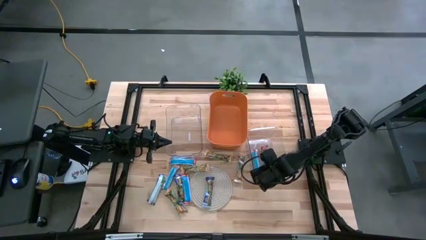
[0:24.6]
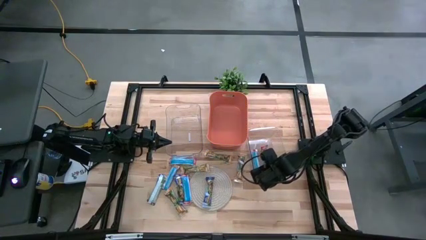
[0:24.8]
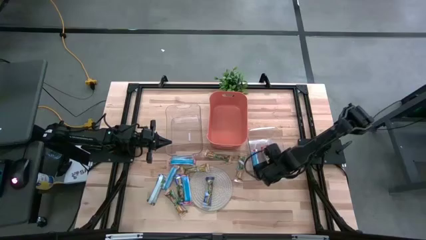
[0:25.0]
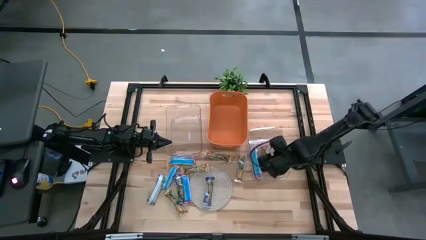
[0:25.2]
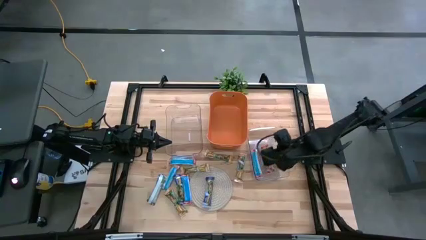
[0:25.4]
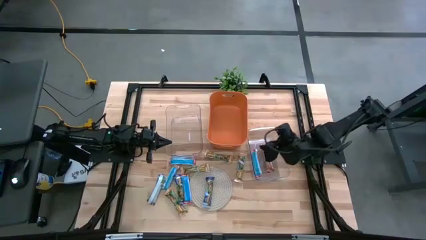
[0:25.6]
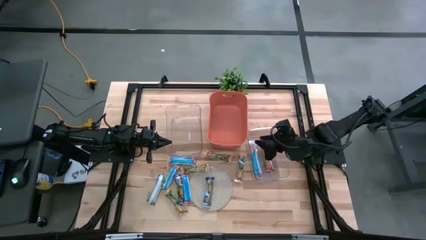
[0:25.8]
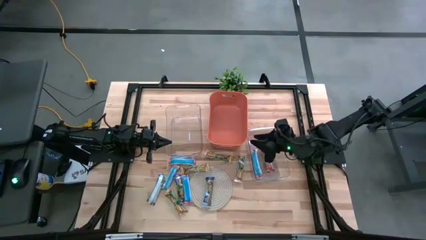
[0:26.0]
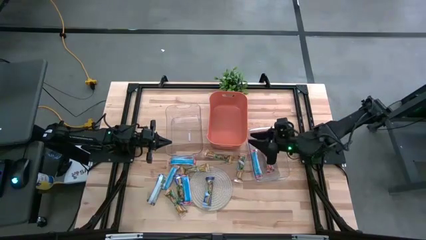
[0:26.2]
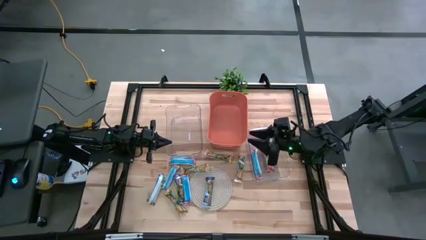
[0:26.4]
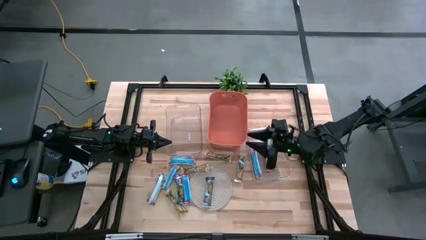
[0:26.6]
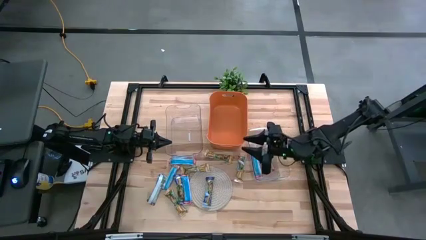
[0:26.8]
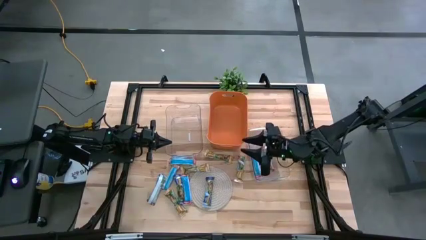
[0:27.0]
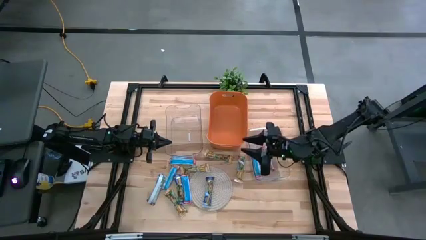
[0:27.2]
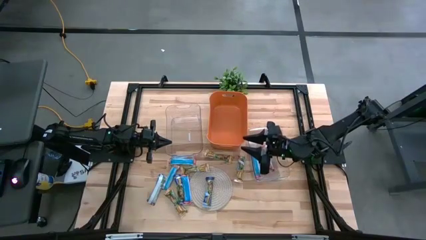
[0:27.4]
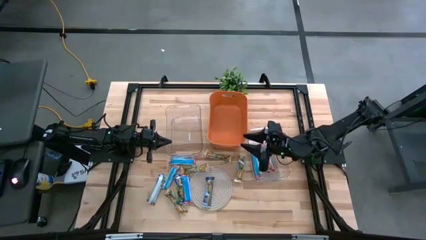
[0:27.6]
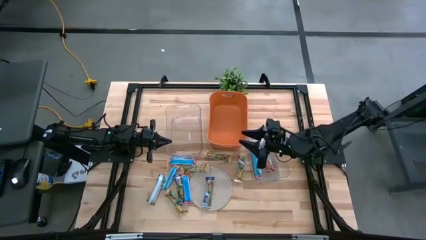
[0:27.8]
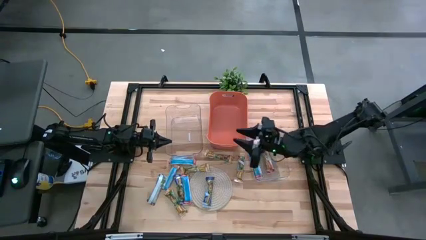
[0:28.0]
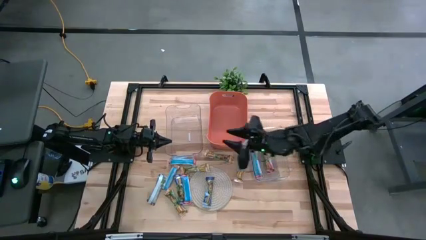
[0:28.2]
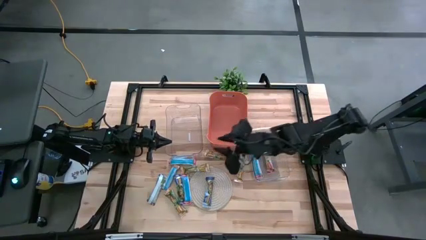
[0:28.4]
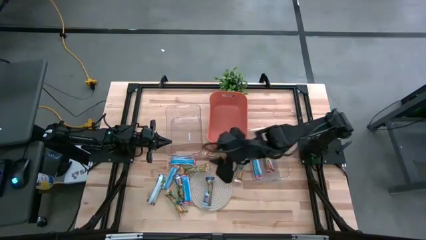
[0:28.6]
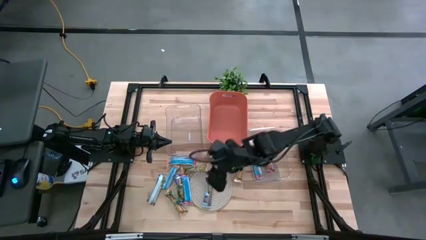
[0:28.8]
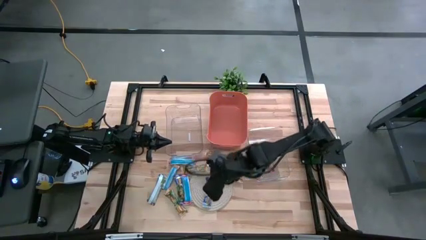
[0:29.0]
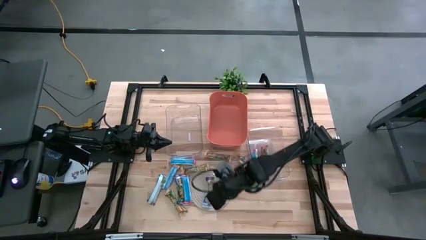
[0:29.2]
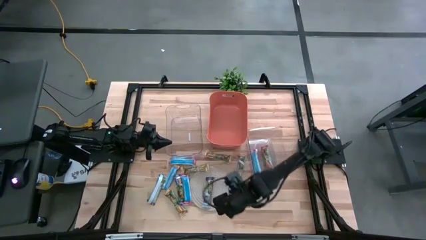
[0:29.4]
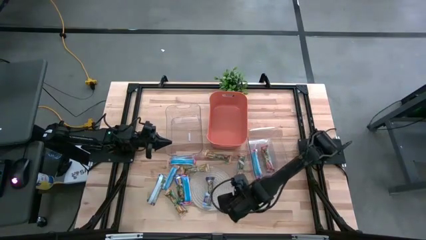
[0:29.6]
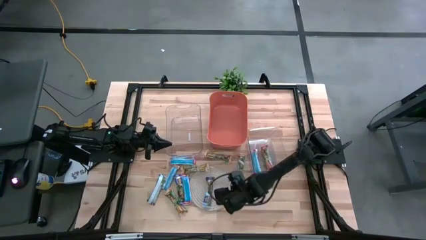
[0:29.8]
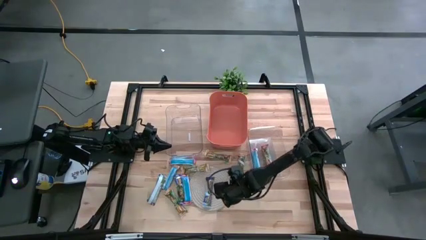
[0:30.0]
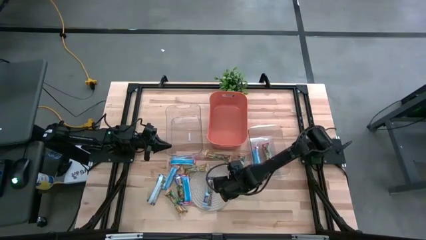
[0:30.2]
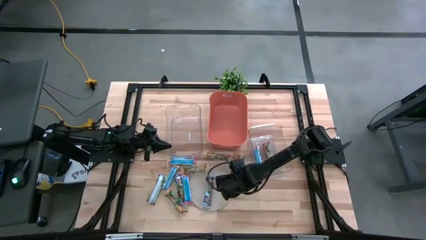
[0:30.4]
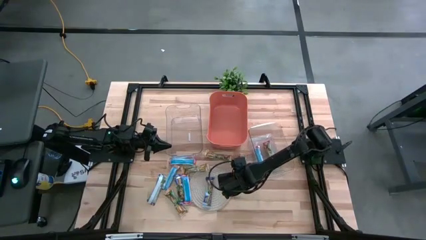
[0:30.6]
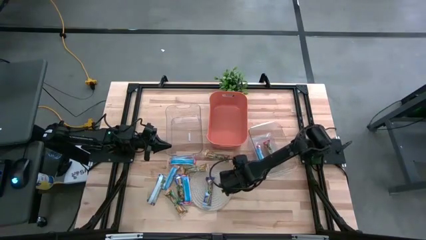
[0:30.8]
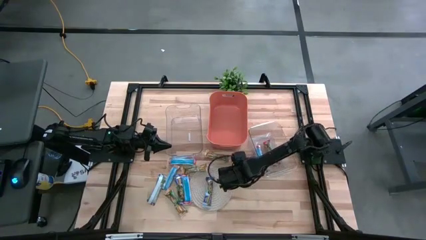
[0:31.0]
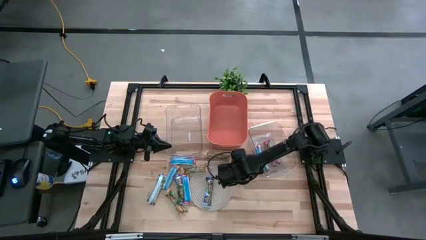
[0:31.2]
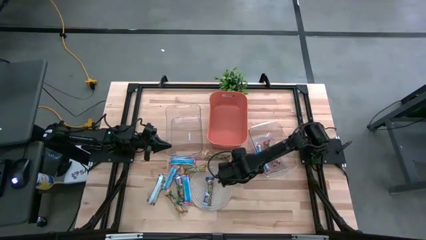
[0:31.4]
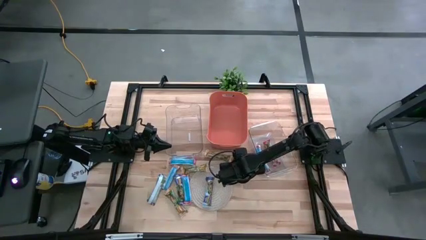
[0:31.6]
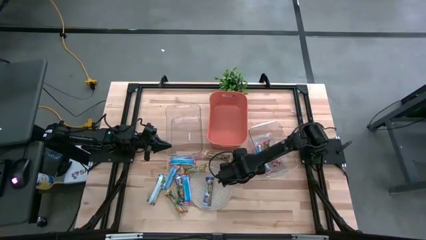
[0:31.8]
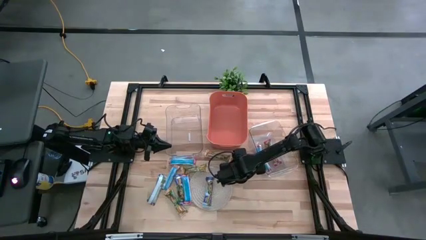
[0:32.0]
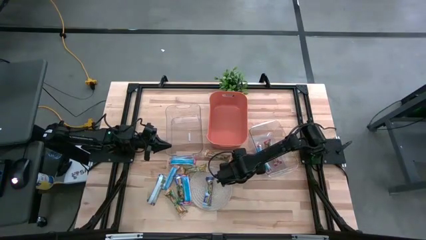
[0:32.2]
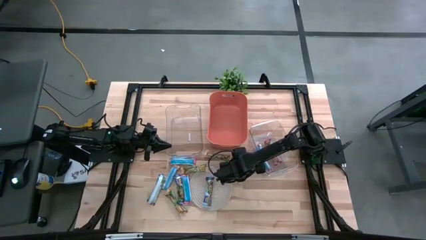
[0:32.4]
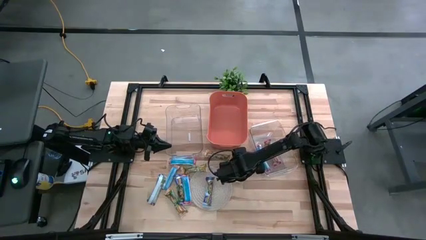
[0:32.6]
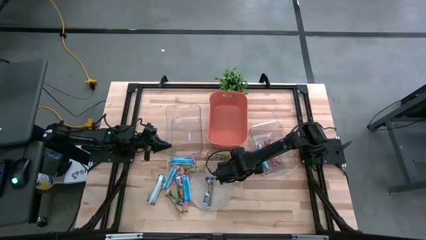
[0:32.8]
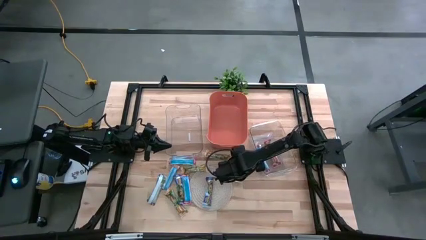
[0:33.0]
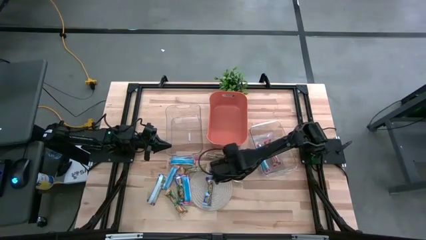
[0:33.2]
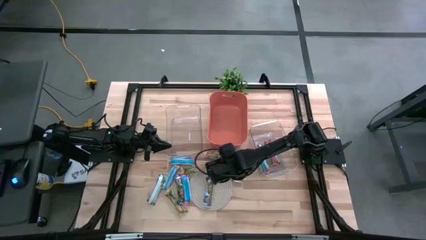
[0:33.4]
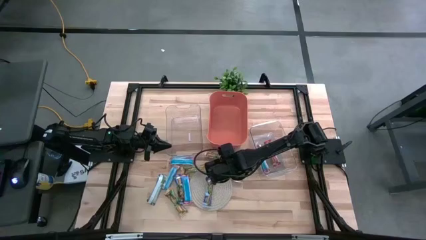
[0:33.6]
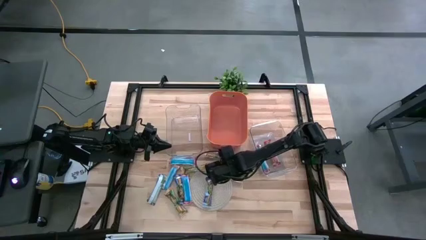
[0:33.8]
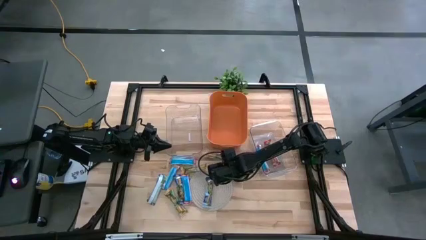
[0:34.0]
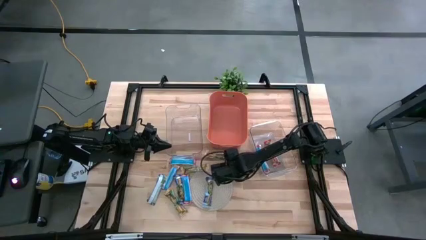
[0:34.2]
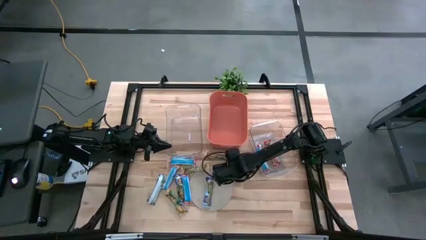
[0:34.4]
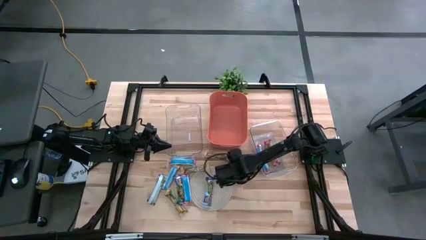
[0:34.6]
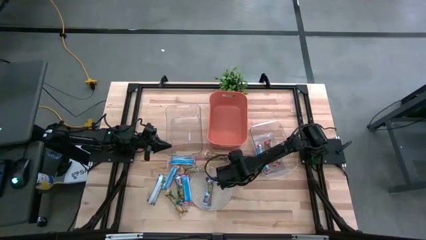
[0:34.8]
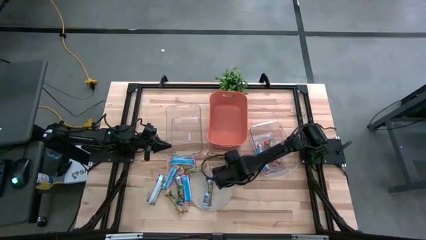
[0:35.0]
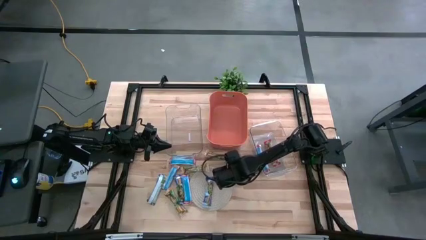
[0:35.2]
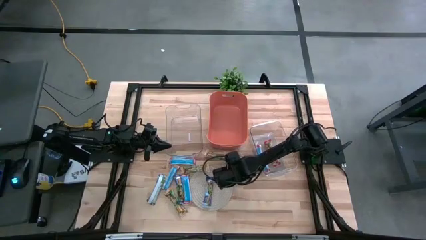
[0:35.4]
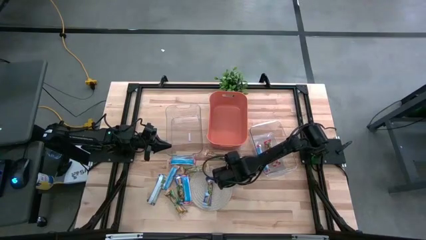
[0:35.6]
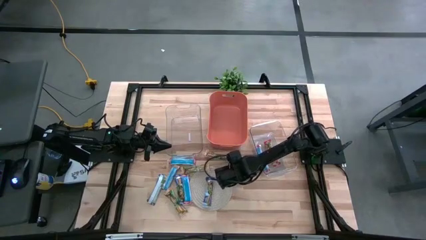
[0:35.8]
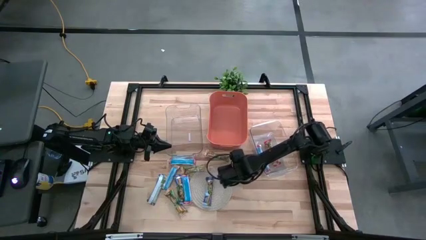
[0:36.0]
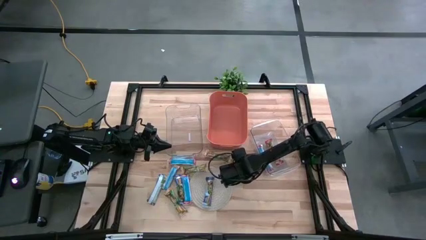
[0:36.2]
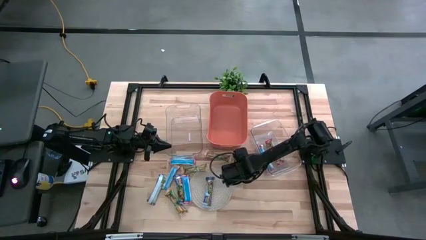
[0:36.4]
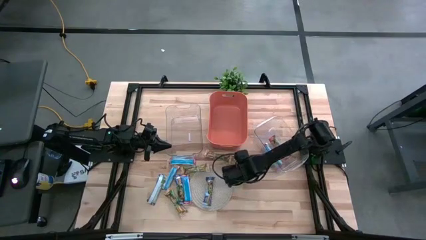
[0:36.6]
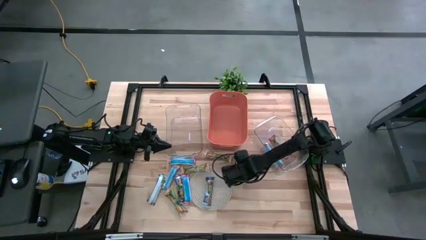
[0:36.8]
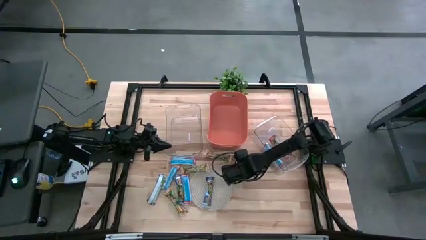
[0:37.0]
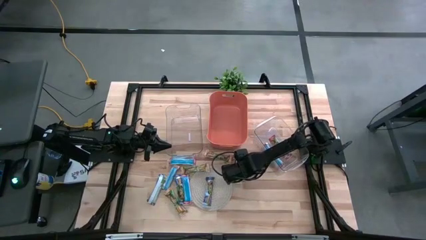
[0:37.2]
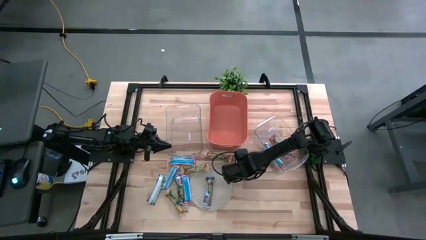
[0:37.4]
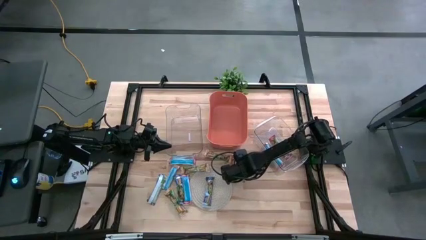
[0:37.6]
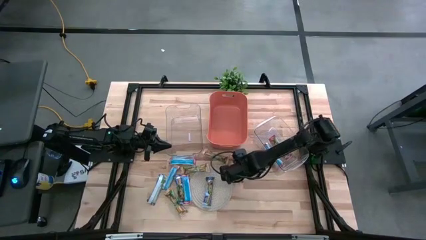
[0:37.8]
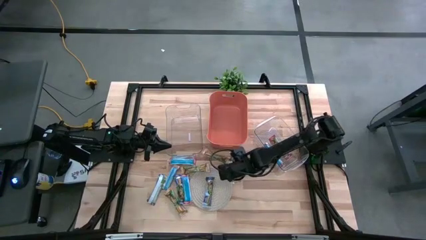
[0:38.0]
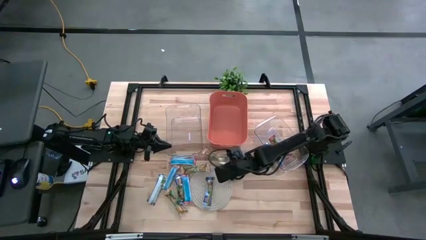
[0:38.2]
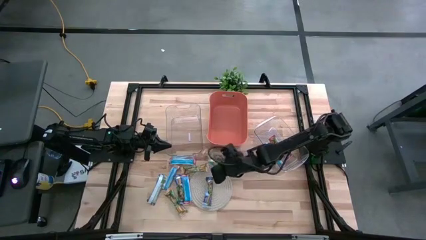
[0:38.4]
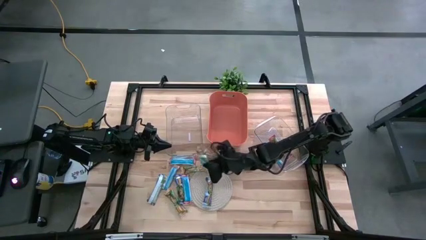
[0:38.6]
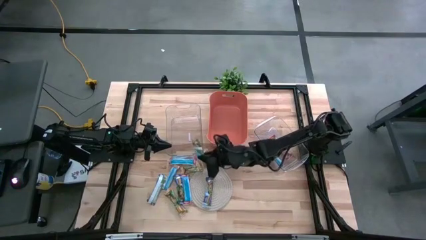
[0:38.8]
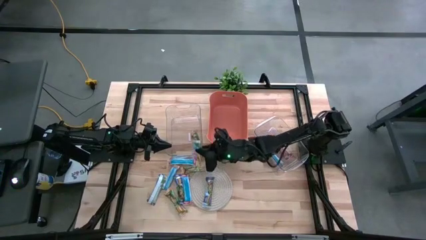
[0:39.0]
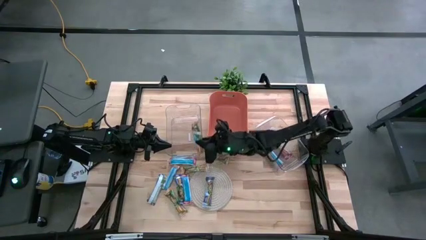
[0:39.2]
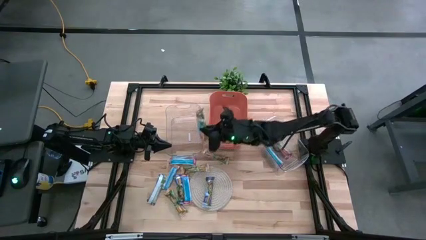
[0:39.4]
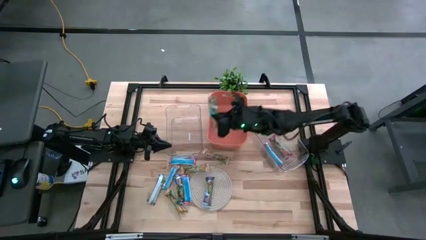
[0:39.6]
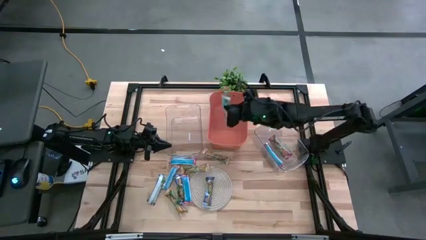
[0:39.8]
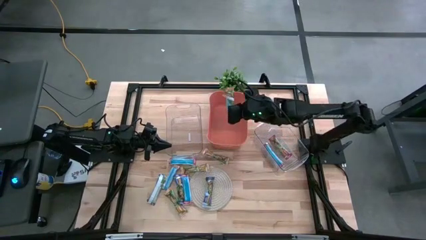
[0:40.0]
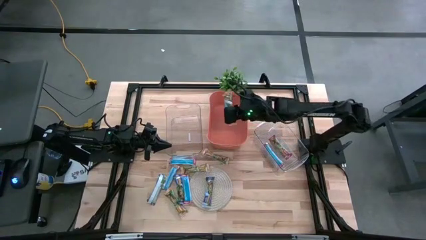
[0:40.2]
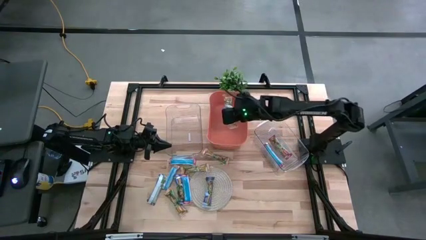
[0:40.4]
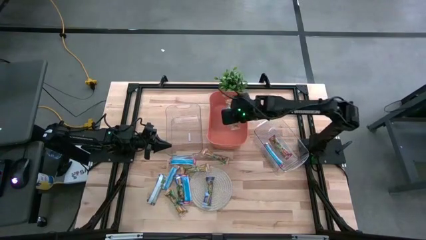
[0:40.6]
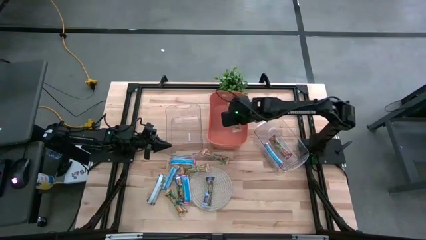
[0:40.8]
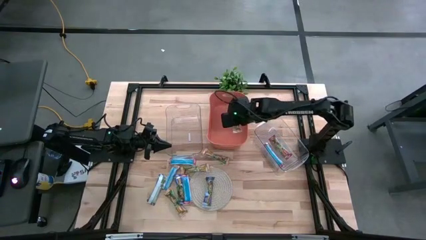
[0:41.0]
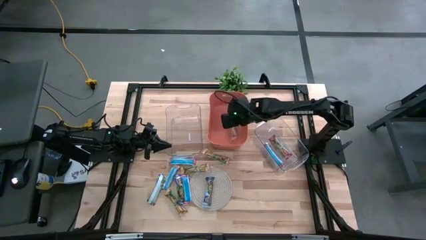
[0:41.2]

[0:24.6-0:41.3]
Task: Pick and place Granola Bars by type
Put the yellow granola bar into the orange bin
